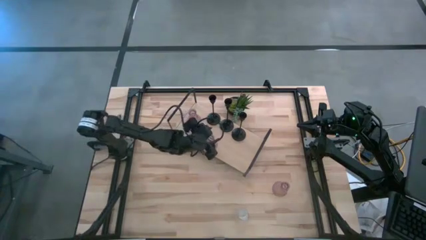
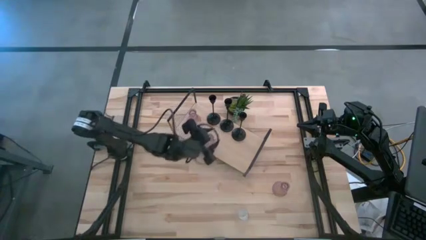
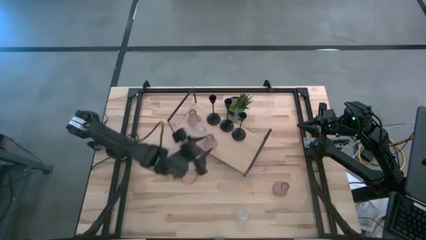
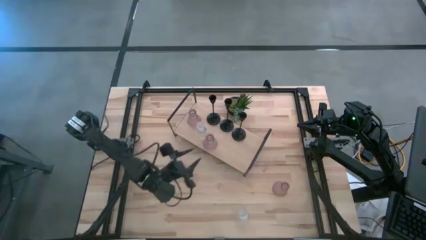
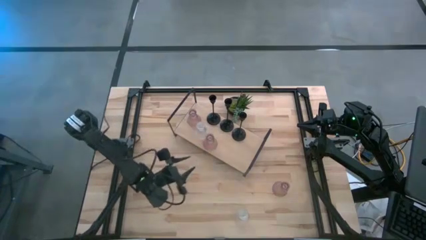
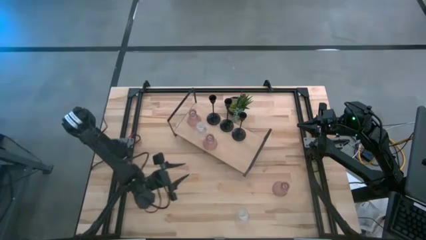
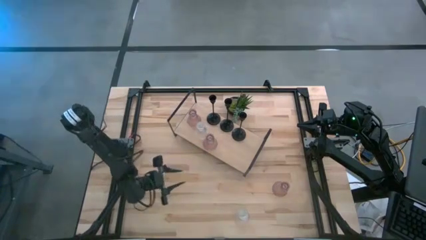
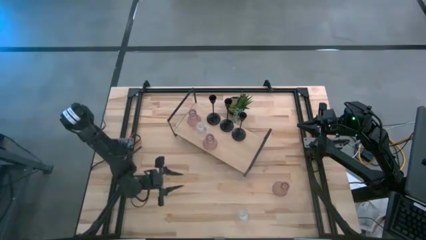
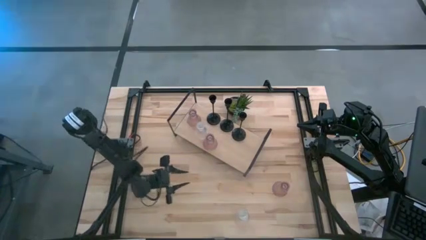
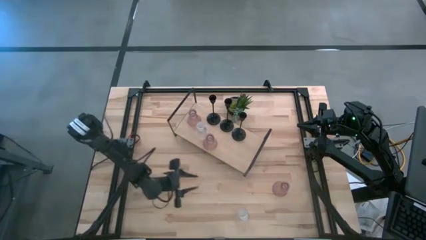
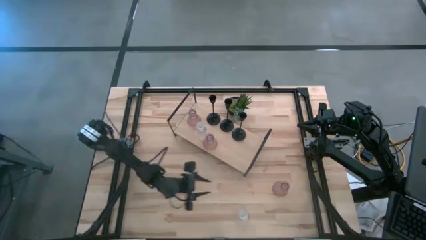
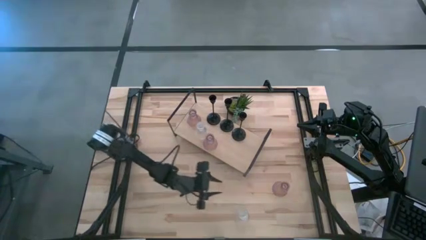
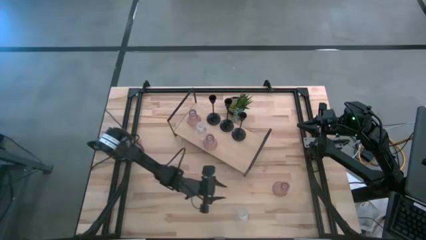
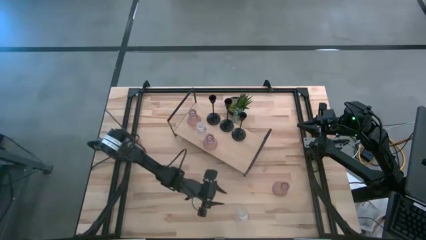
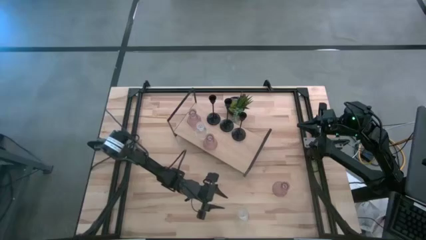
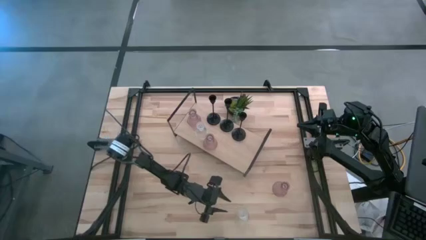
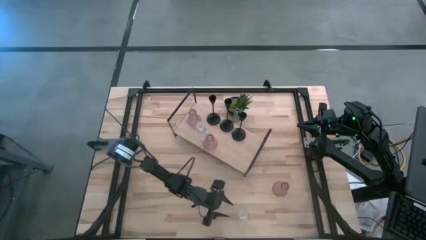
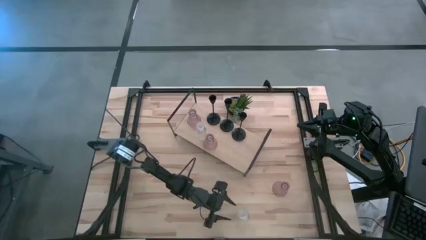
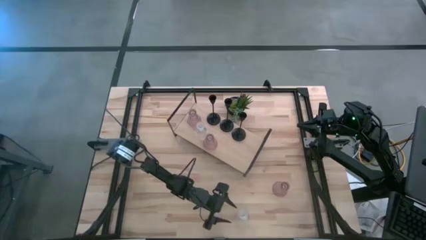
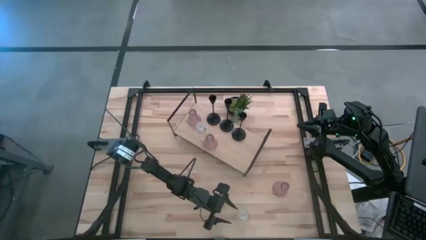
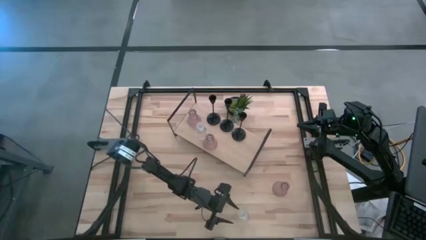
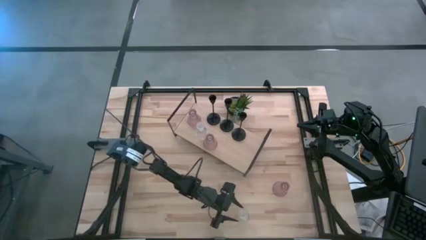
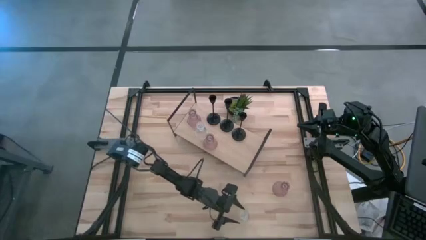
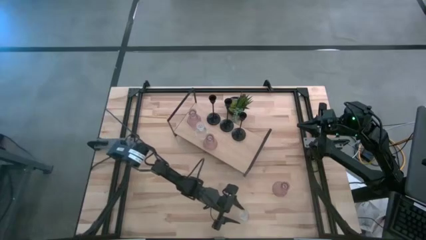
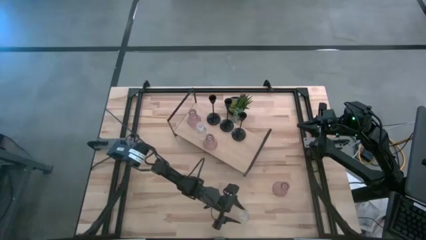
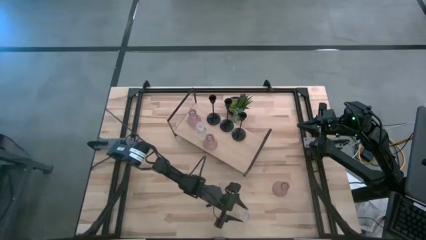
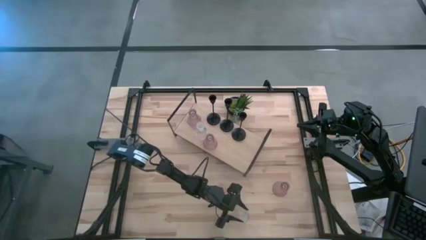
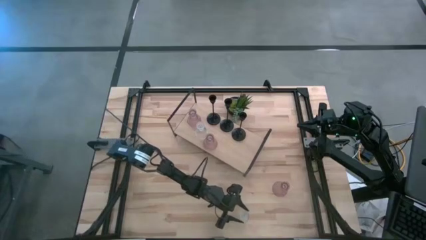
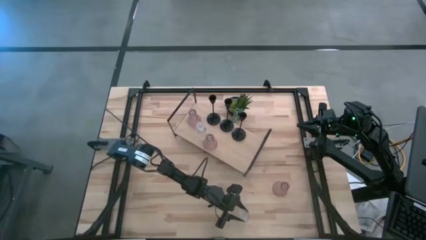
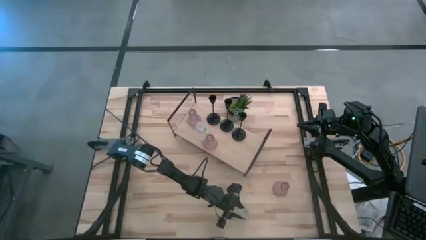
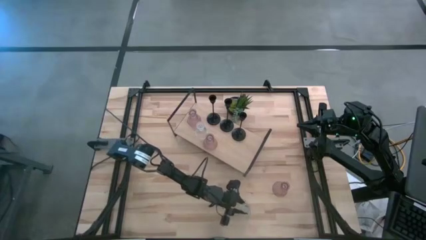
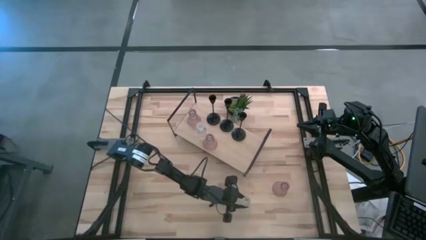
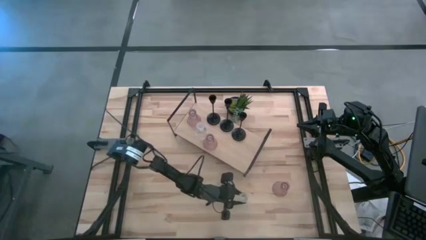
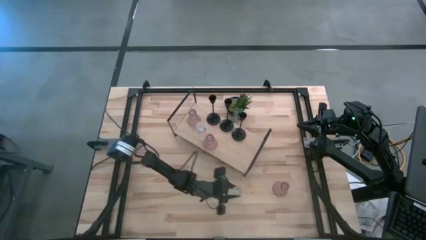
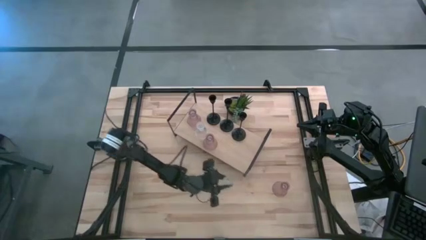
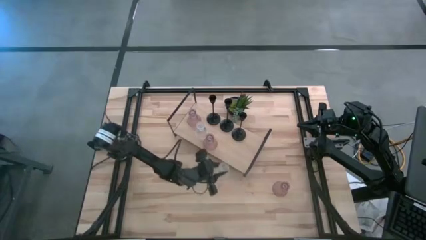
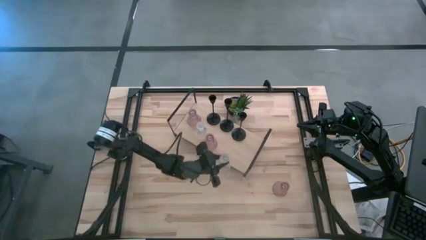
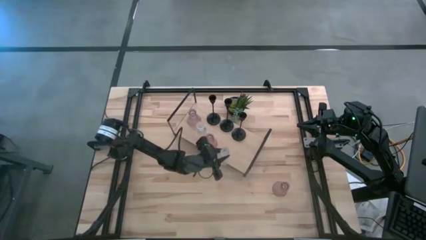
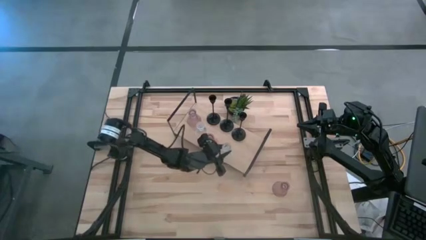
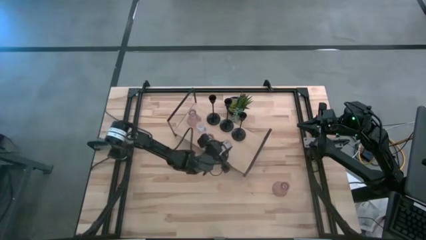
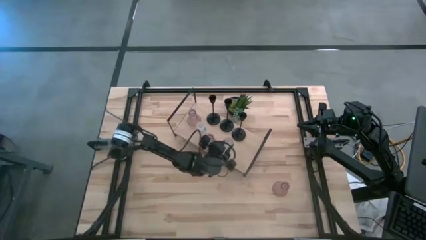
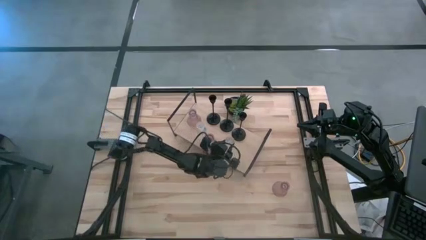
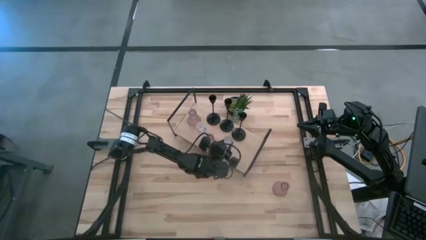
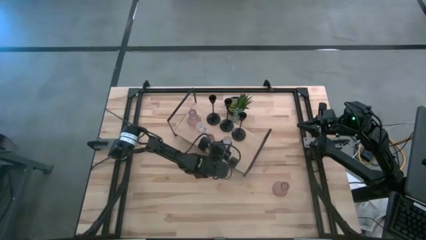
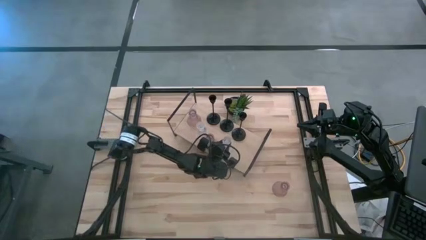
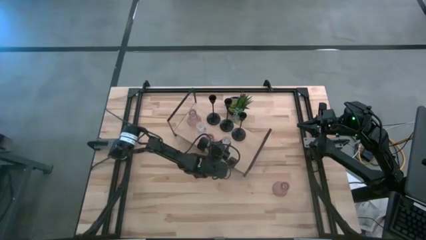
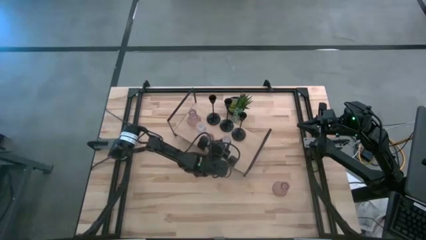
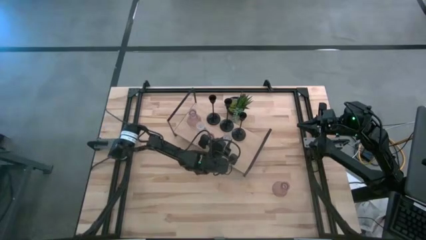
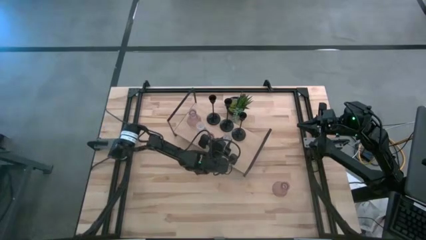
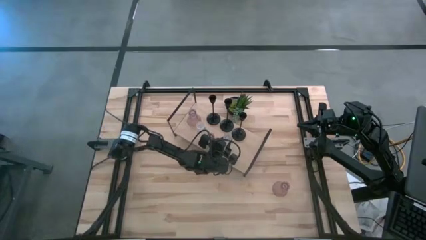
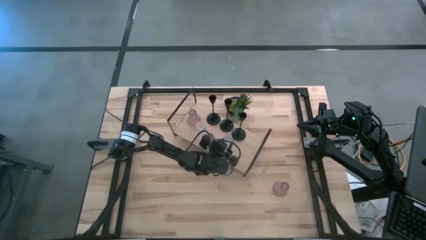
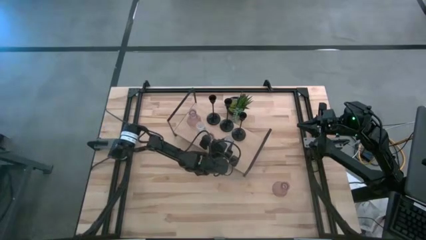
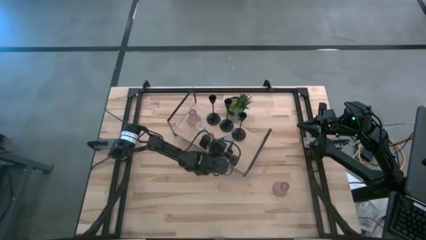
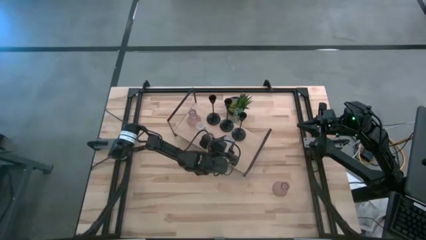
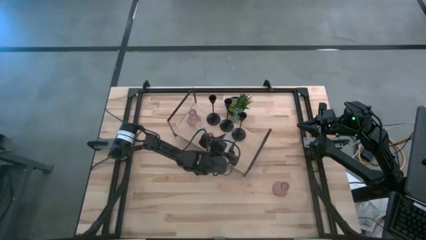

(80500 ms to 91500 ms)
Task: Pick & Place candle stick holders
Put the transparent glass candle holder on the shelf

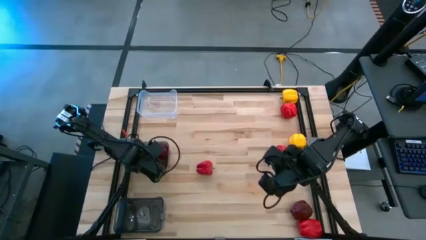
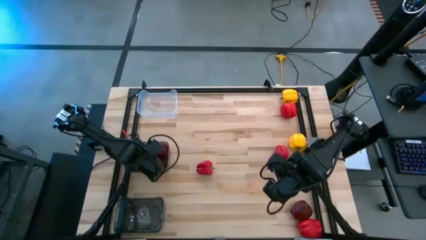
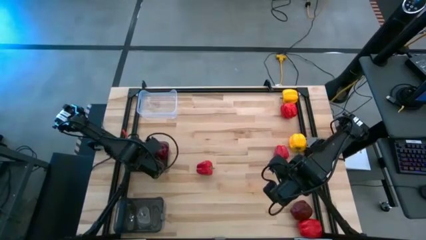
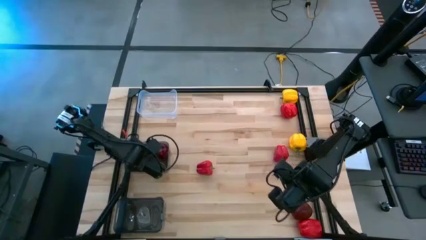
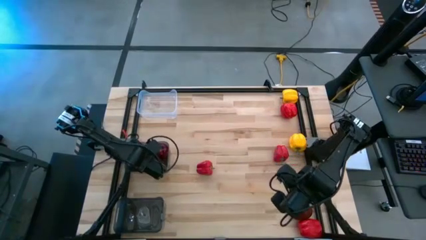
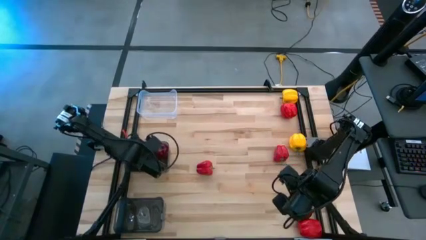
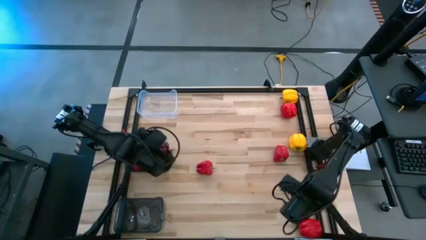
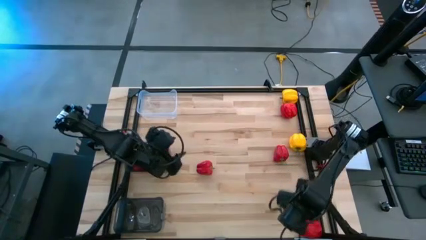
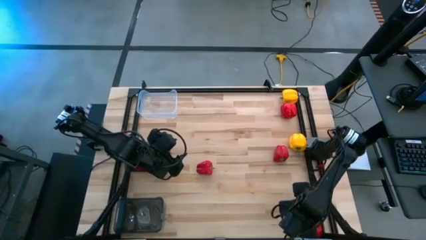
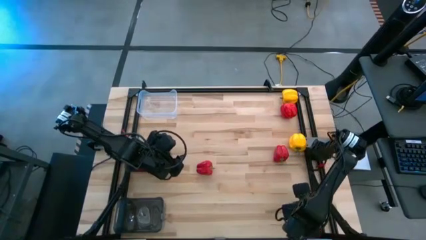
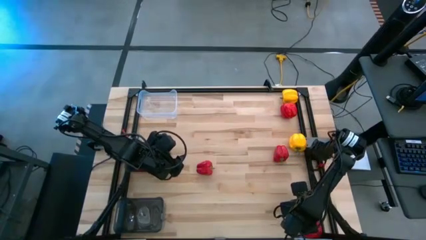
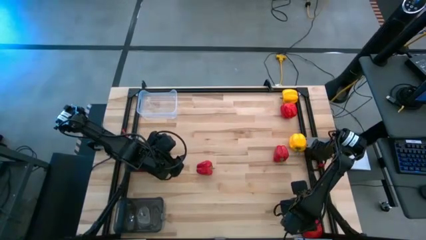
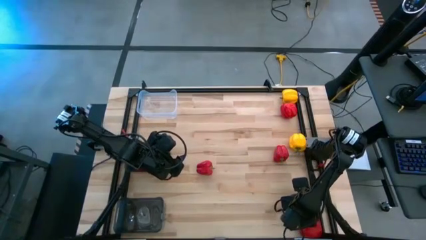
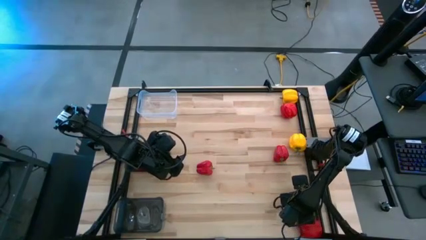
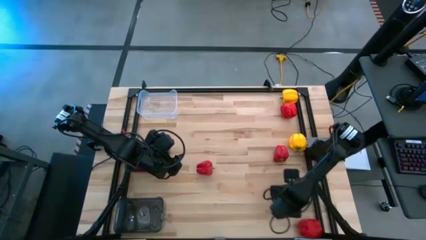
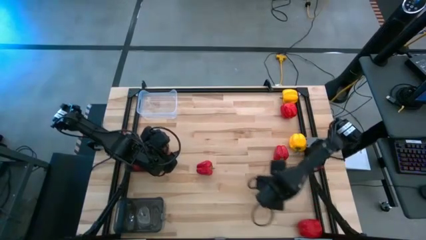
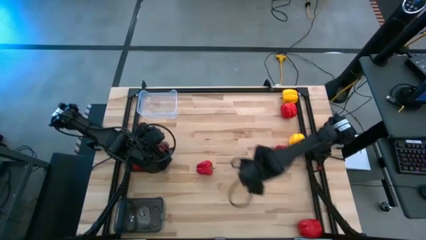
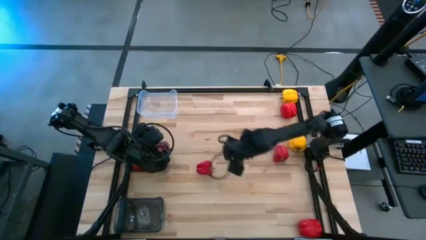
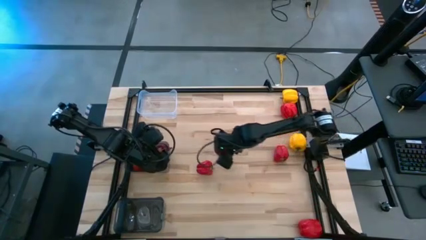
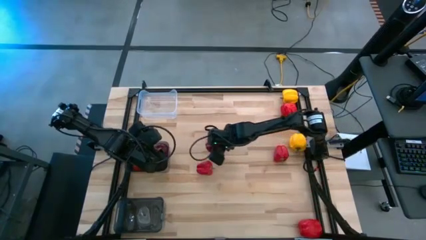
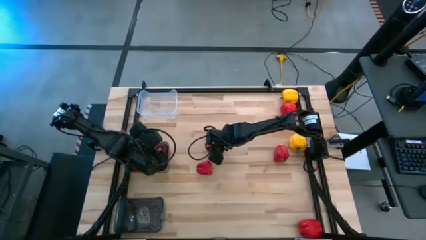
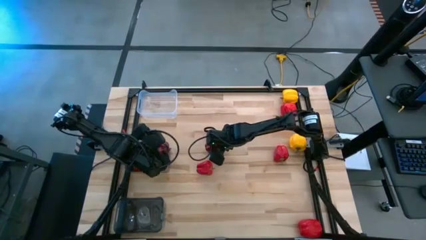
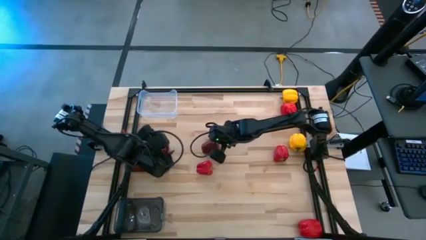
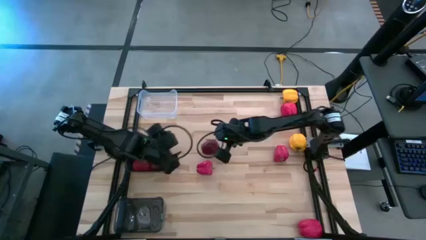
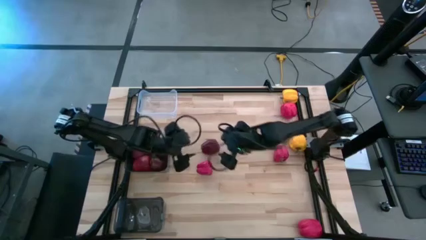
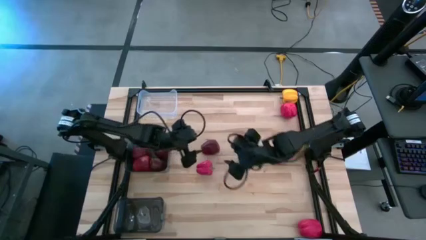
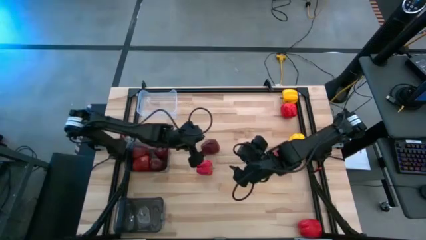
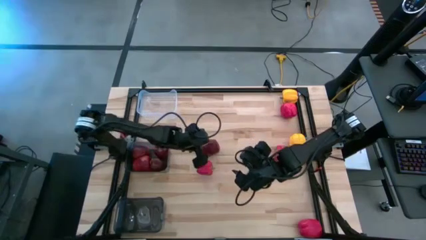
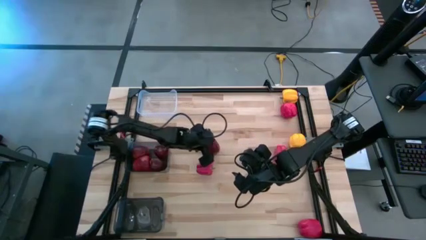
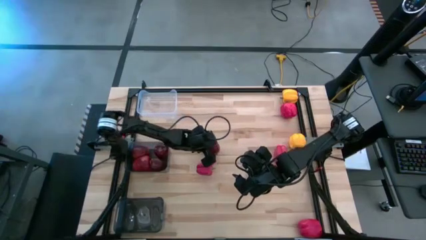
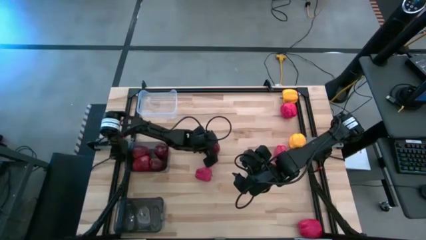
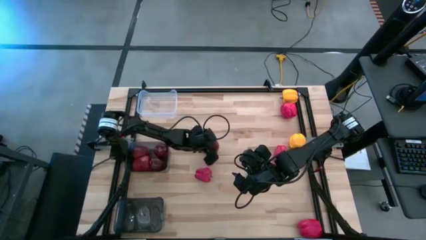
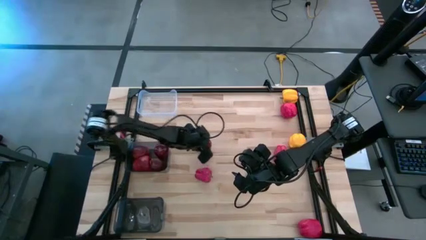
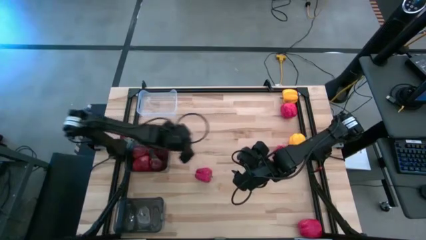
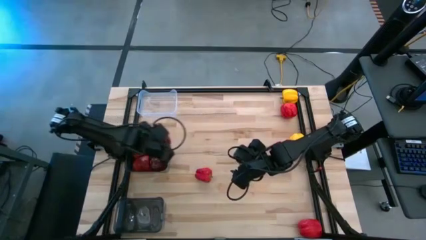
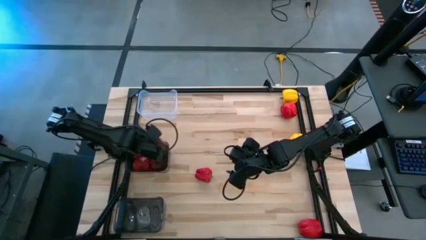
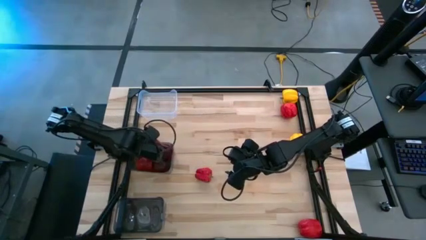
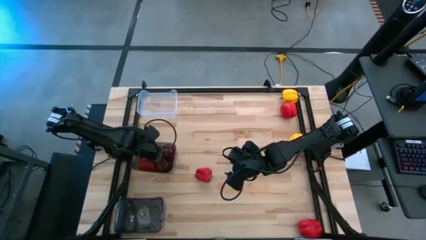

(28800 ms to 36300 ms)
Task: Sort produce into baskets
Put the red apple into the top black bin
